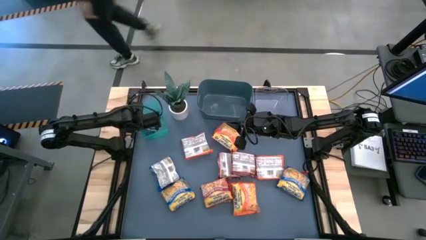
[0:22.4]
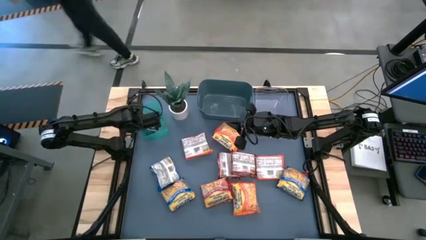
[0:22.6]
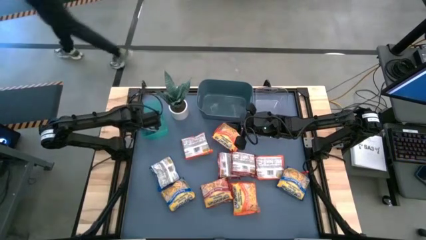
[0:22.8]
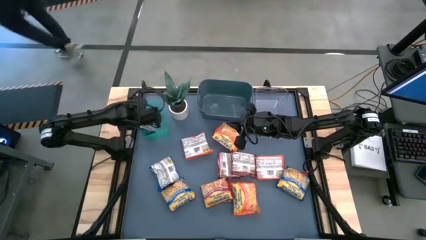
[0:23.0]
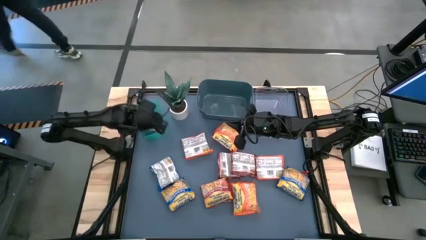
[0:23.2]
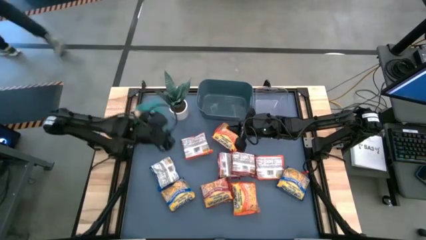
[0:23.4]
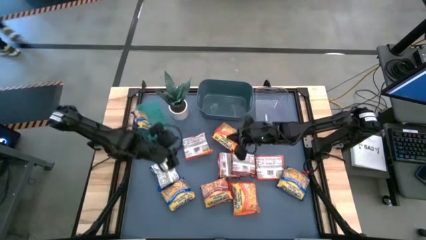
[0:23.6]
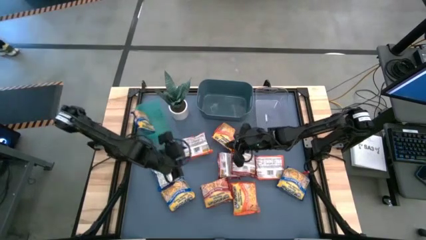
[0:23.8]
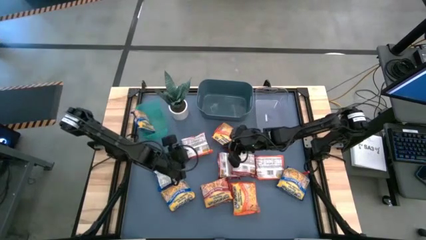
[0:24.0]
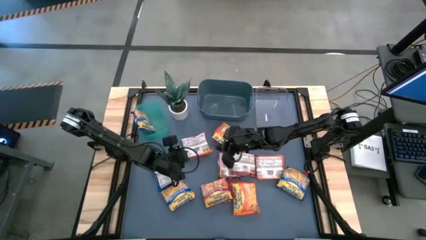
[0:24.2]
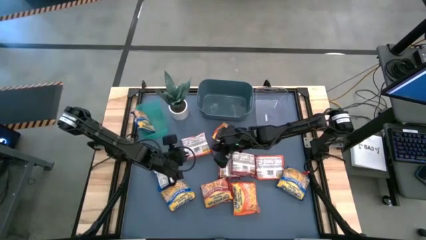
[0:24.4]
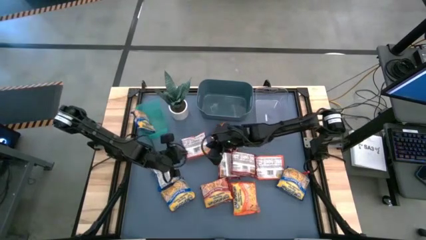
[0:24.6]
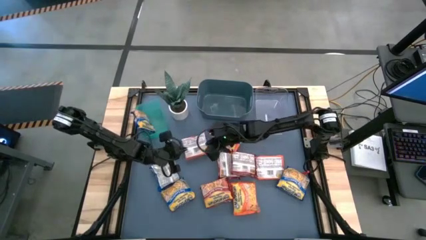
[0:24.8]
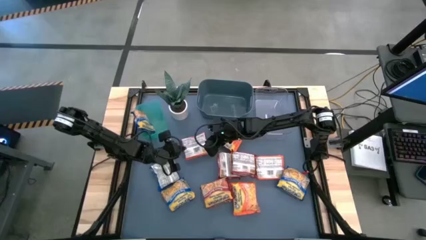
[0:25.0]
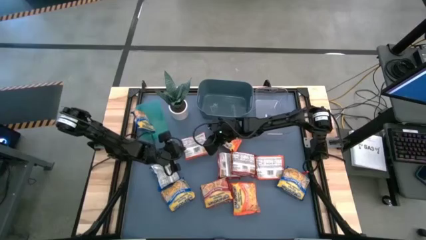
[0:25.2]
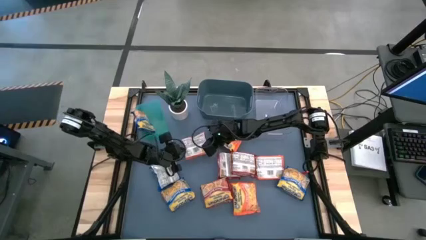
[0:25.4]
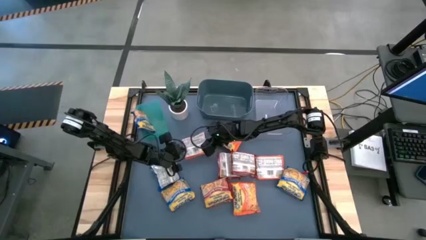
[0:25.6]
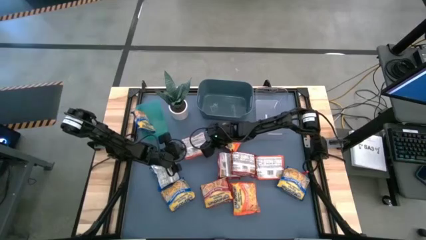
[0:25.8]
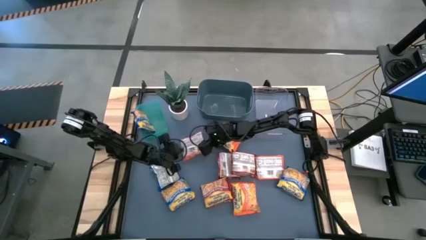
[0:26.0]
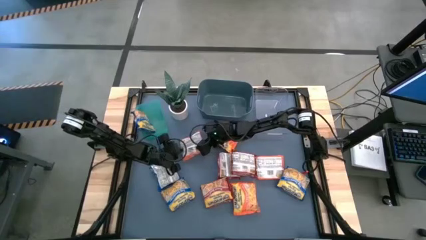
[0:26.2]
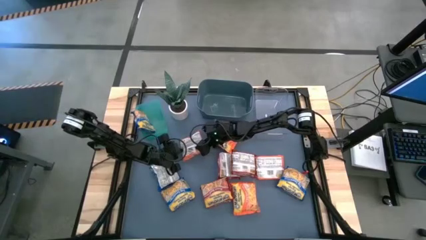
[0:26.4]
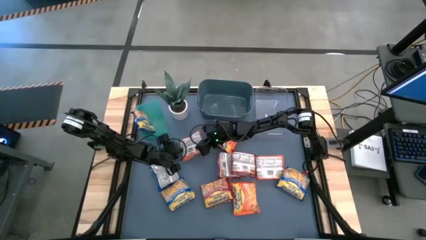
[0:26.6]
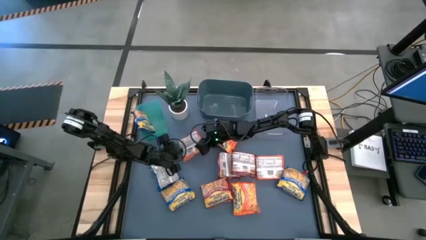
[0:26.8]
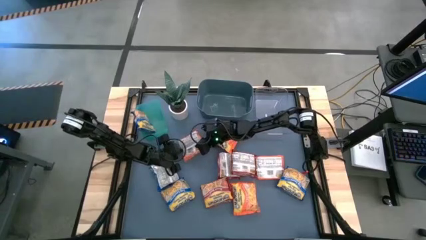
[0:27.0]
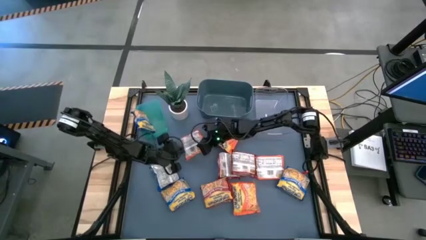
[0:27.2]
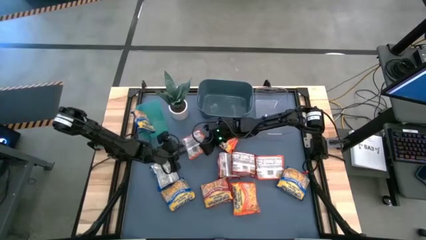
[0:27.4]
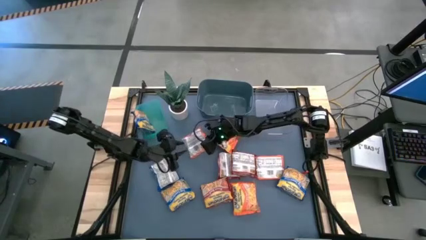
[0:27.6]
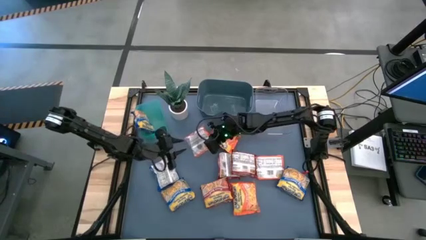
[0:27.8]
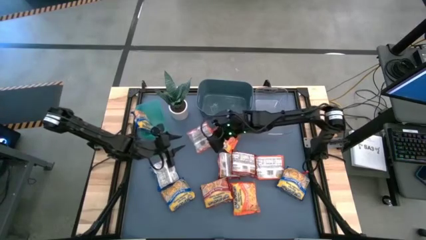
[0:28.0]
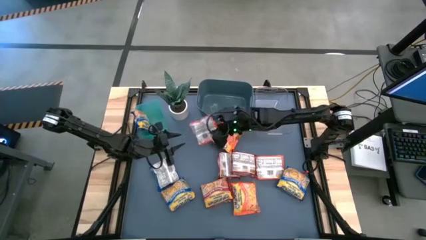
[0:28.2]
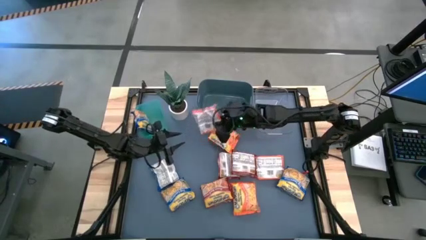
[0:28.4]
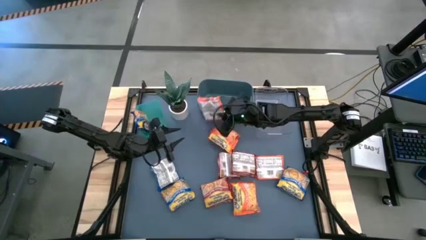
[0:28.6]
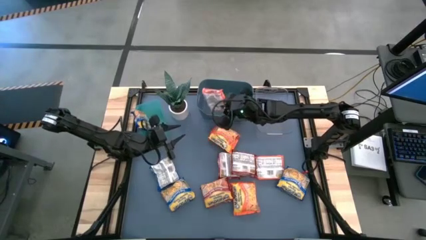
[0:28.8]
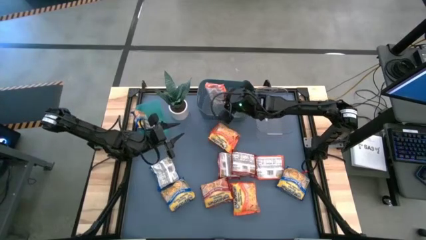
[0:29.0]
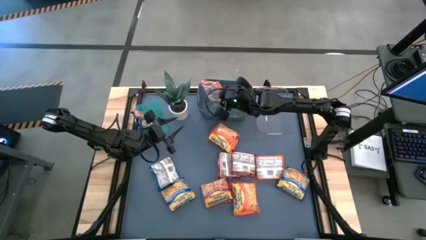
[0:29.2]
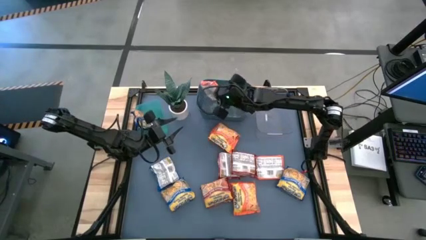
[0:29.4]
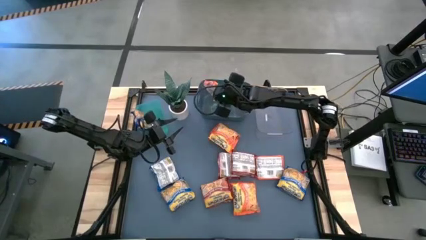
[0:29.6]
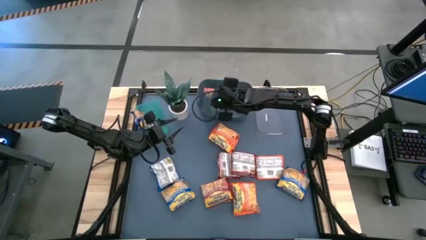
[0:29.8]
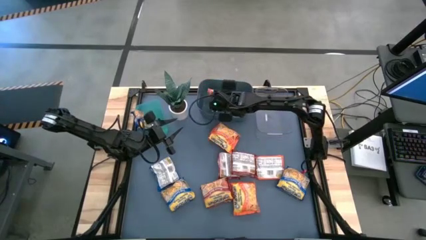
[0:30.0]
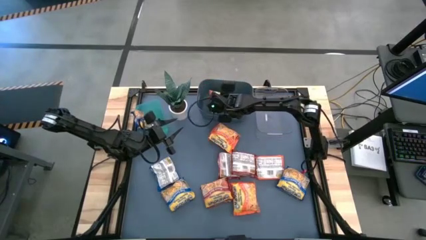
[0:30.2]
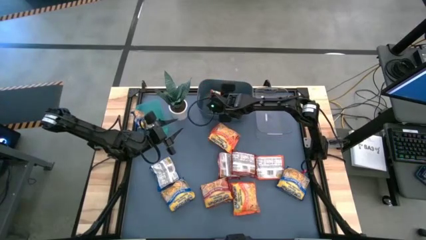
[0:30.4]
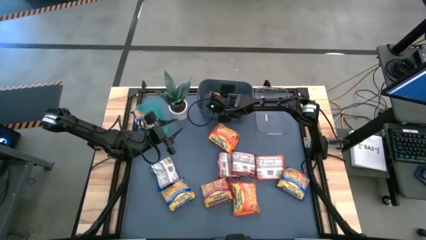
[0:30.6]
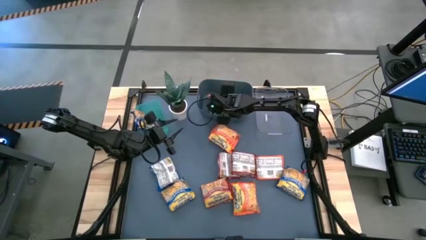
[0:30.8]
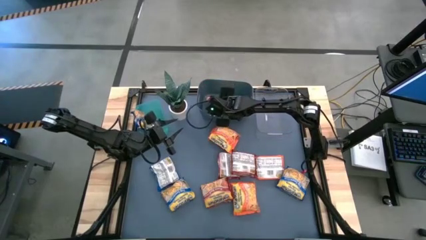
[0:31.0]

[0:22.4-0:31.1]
Task: Sort Maruchan noodles
Put the orange noodle pack into the blue bin

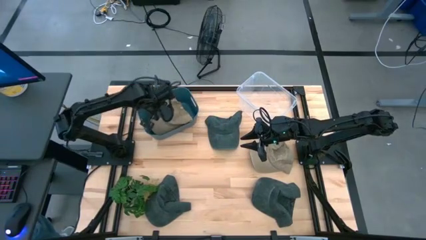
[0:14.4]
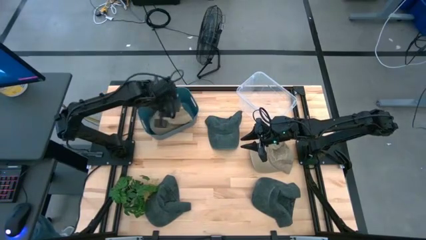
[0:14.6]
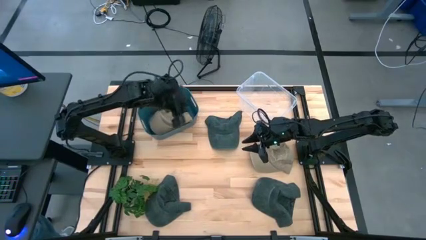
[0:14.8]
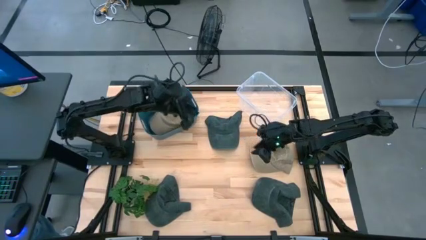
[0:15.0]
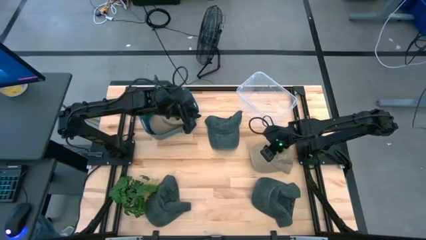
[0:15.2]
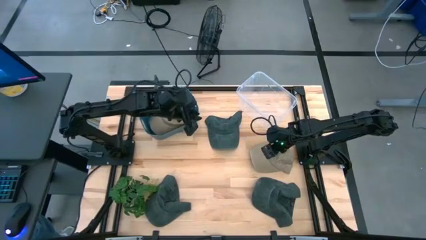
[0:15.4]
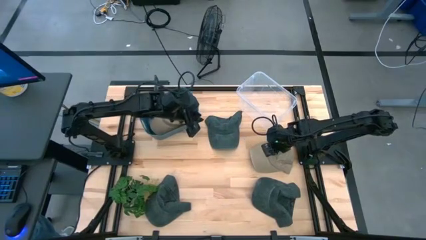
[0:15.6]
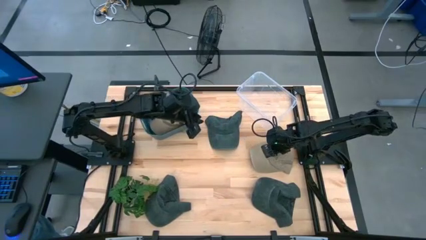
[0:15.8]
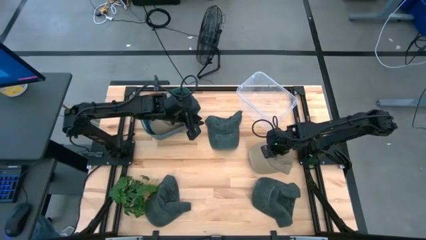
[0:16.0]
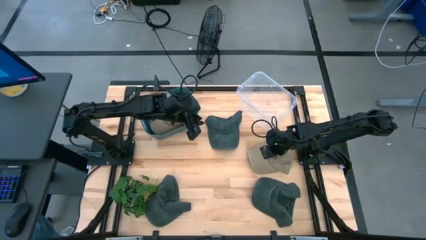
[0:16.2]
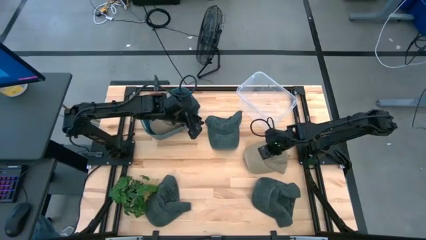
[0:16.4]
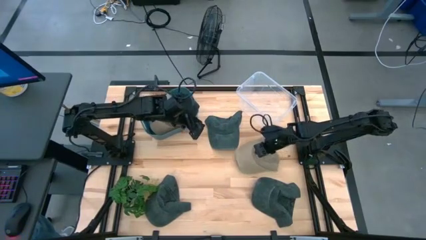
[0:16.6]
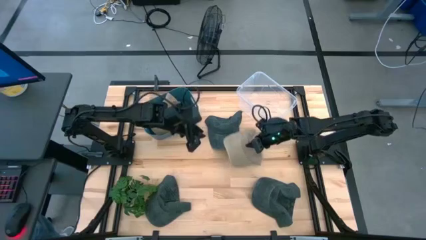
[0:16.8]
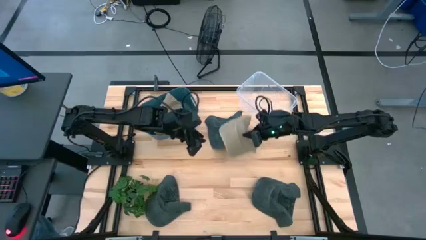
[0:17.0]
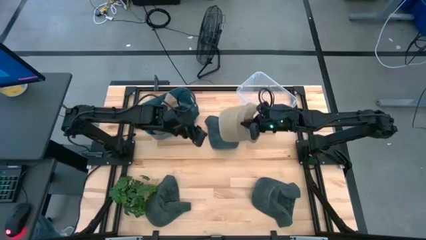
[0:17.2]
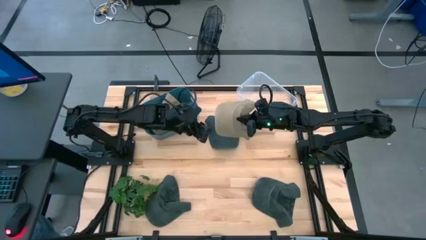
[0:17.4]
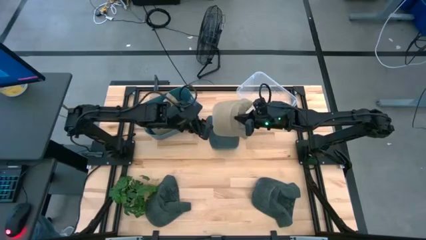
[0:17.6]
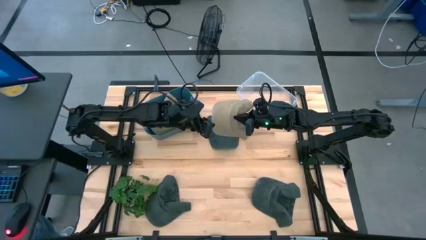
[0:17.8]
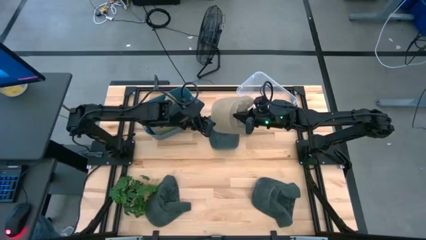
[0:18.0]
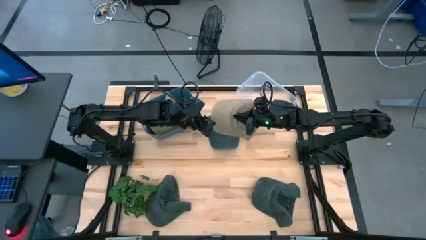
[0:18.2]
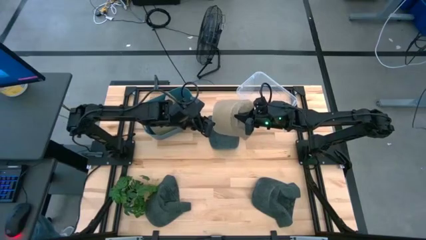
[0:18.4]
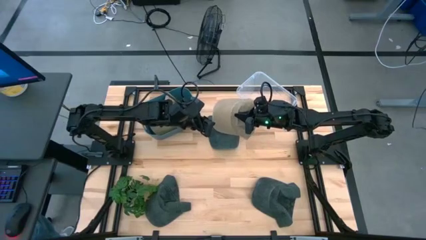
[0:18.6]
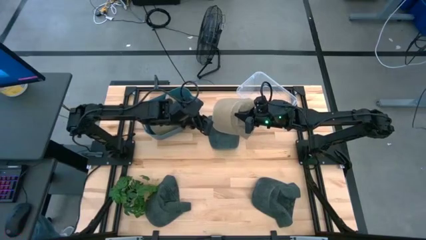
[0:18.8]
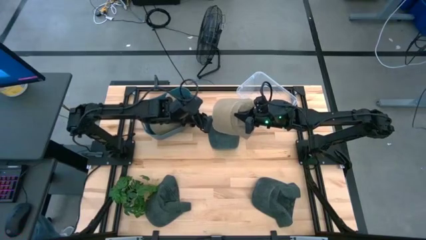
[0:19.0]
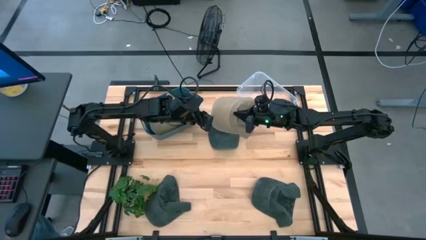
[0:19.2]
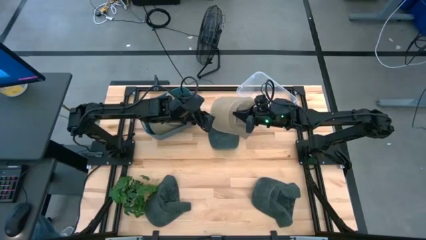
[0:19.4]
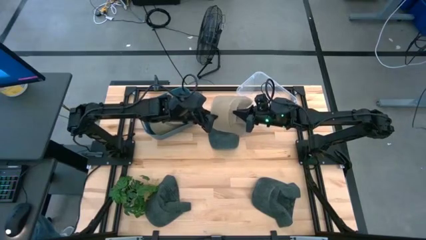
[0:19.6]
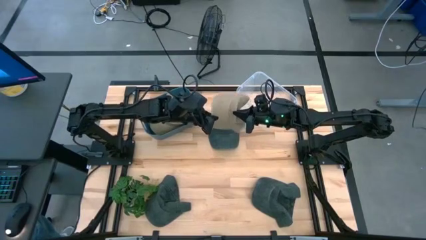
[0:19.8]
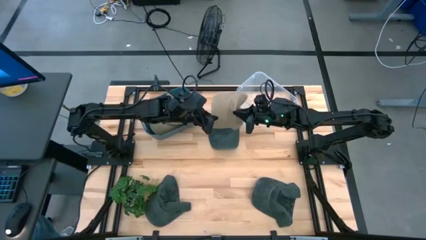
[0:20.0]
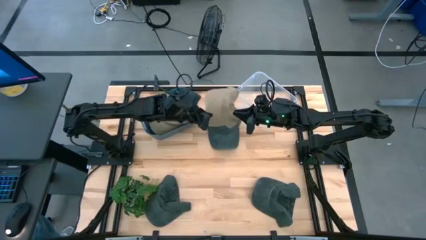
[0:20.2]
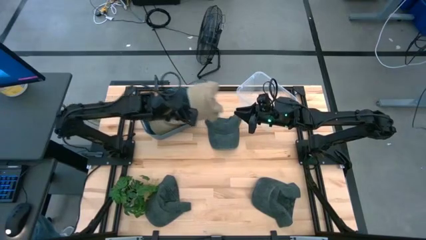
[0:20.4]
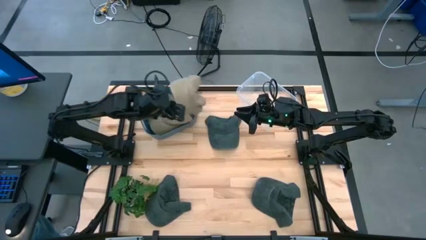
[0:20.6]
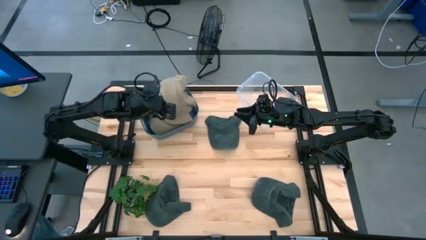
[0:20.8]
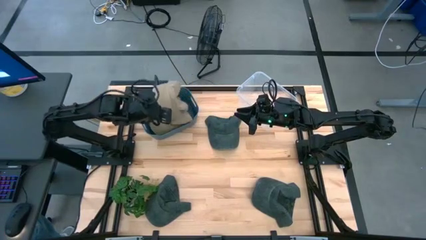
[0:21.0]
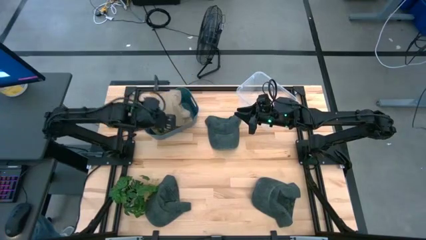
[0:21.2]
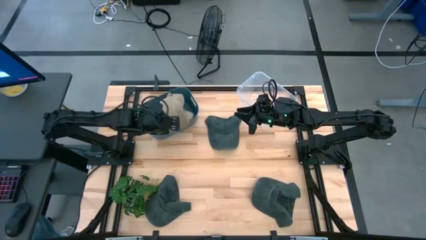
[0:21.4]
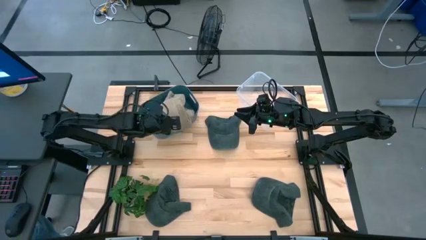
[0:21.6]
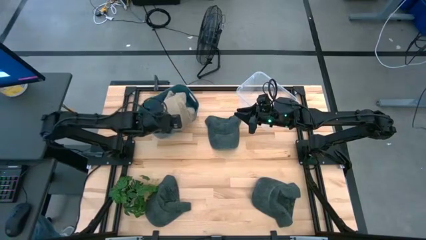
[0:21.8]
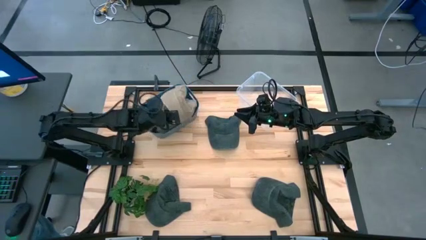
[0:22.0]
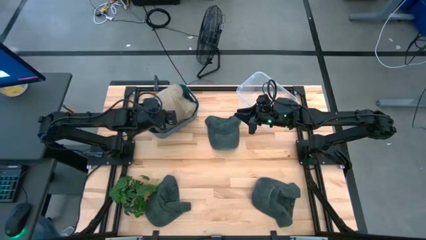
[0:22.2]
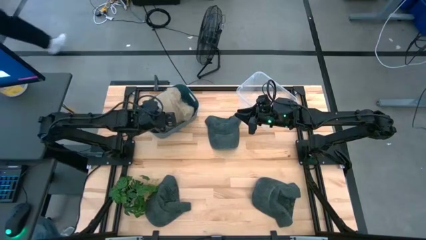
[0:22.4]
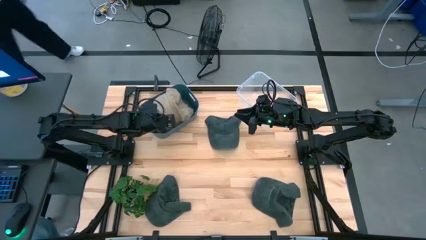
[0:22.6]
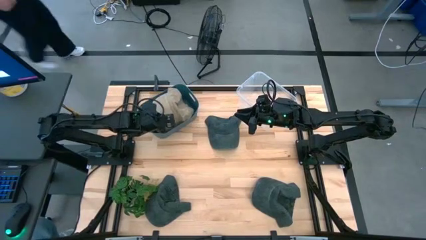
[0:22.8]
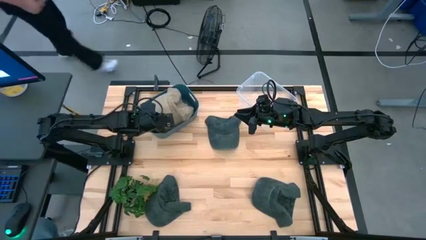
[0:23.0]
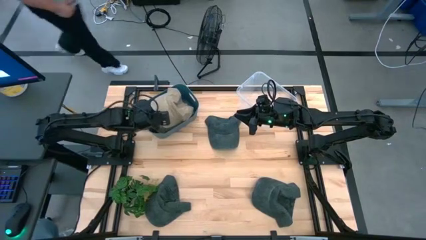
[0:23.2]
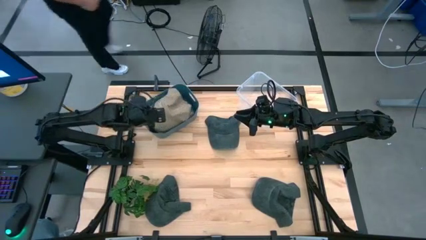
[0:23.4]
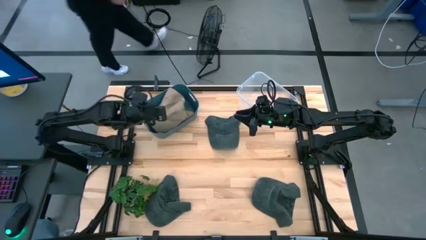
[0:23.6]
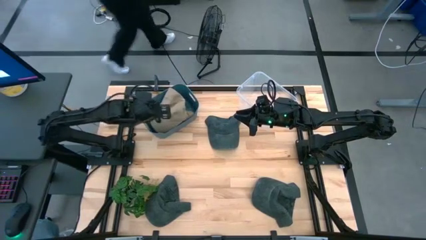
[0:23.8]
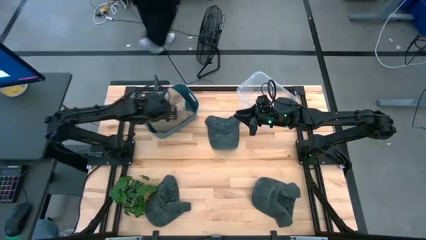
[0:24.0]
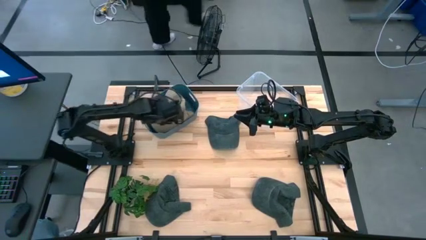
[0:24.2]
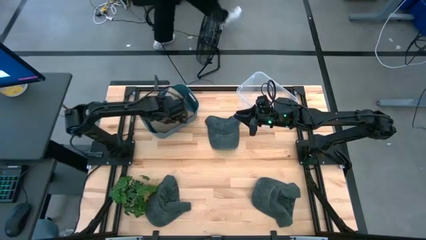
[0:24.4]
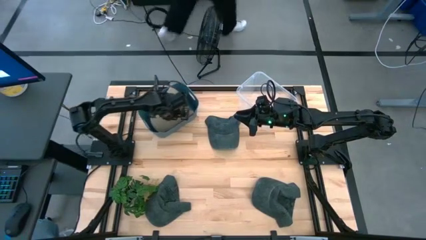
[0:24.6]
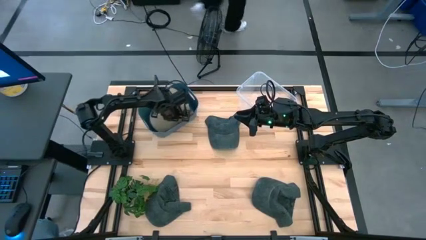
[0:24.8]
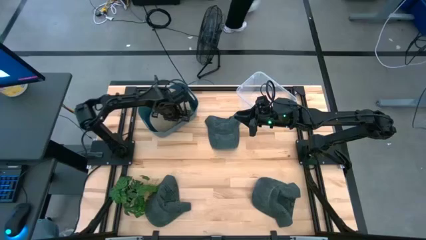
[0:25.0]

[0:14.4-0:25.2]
Task: Pick & Place hat
Put the brown cap into the blue bin
